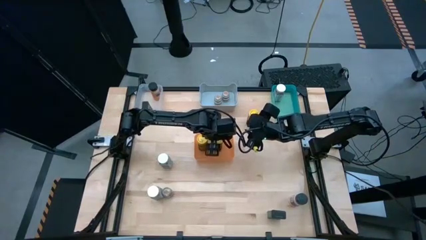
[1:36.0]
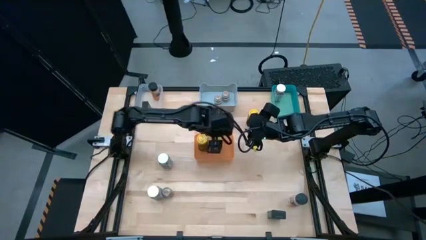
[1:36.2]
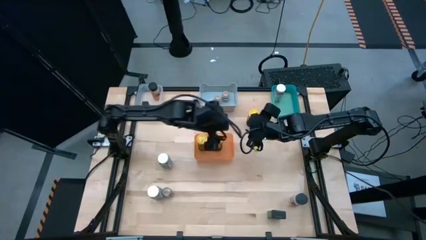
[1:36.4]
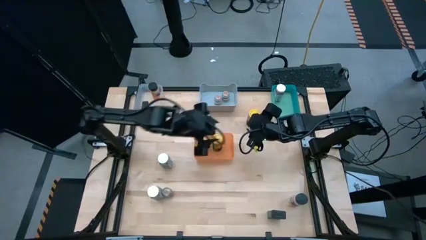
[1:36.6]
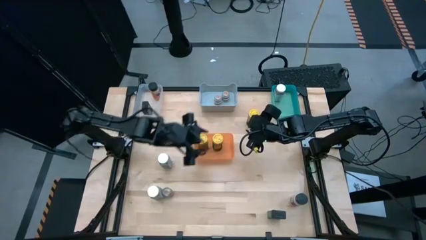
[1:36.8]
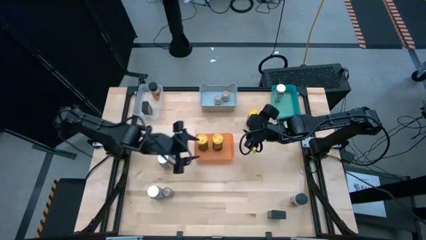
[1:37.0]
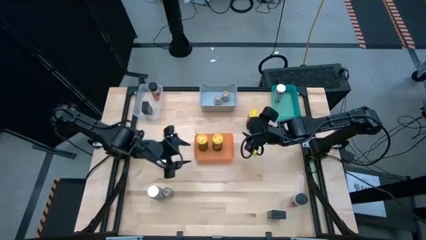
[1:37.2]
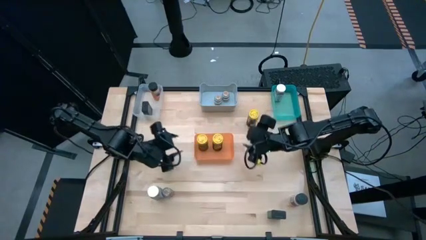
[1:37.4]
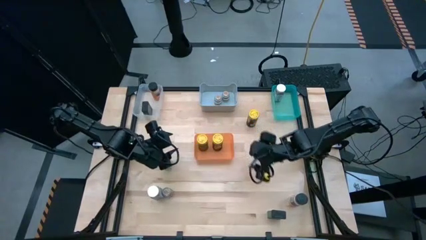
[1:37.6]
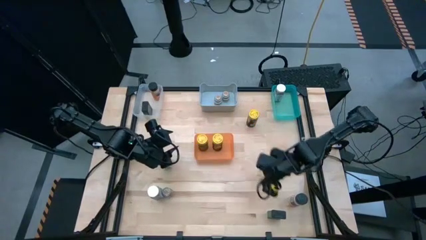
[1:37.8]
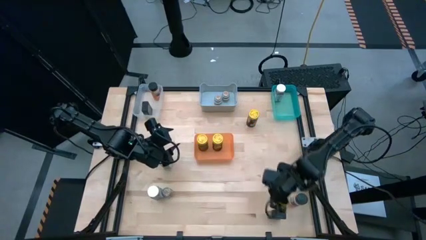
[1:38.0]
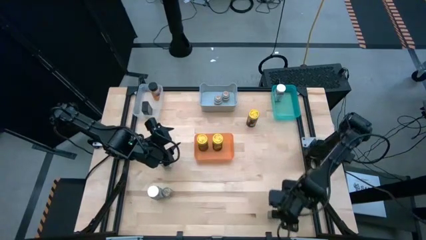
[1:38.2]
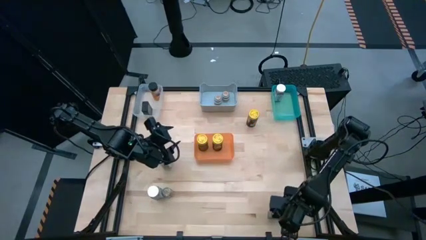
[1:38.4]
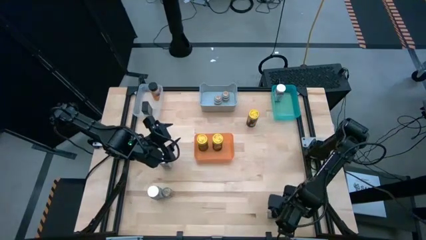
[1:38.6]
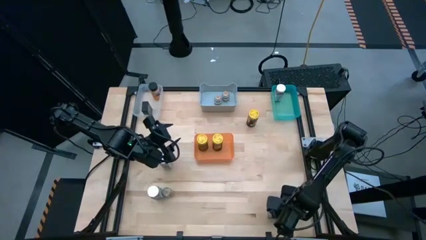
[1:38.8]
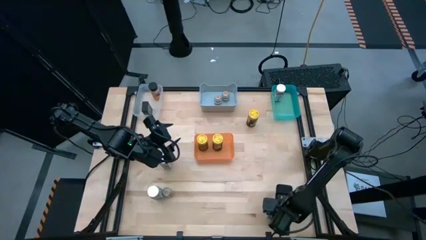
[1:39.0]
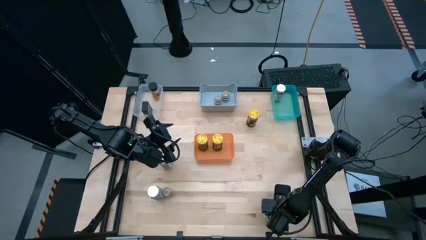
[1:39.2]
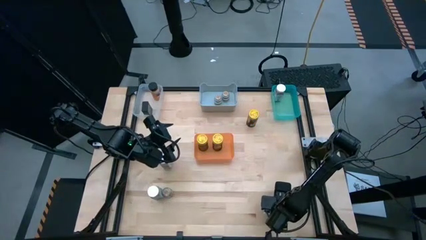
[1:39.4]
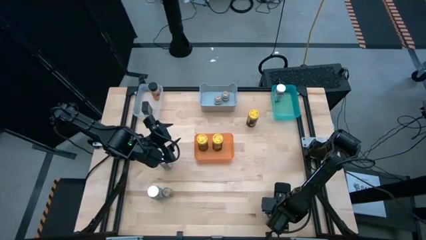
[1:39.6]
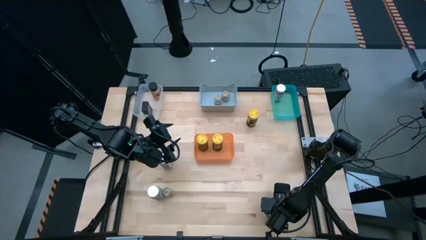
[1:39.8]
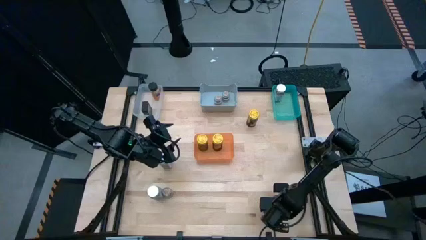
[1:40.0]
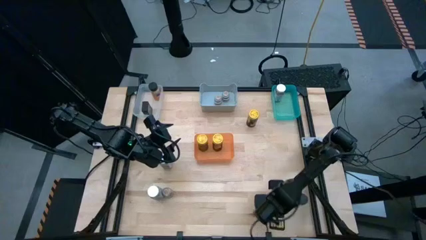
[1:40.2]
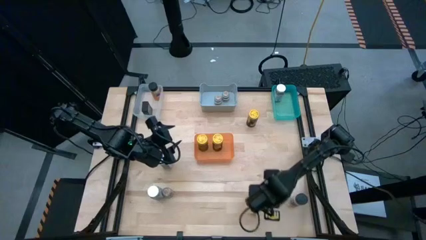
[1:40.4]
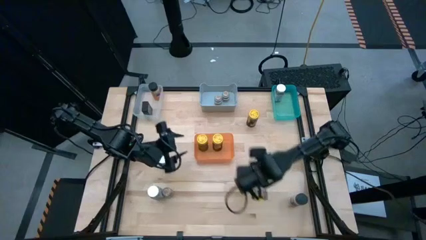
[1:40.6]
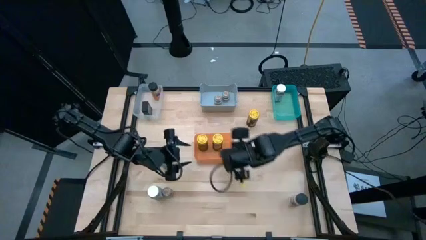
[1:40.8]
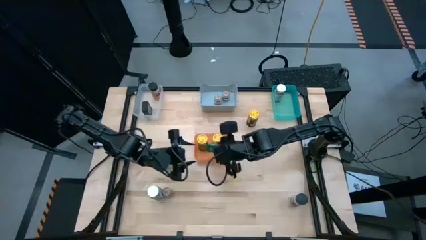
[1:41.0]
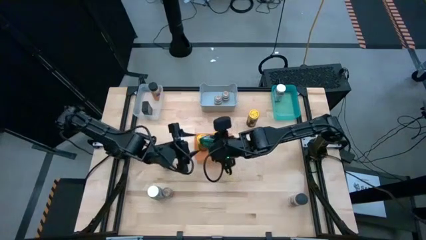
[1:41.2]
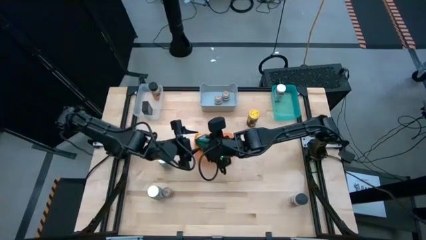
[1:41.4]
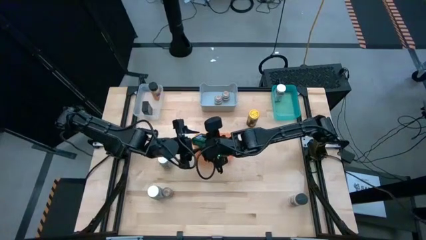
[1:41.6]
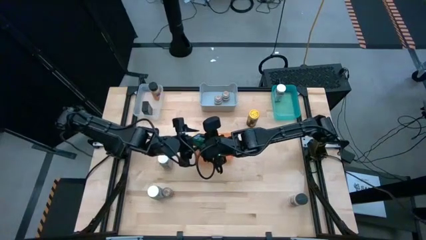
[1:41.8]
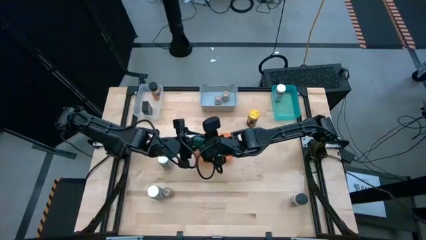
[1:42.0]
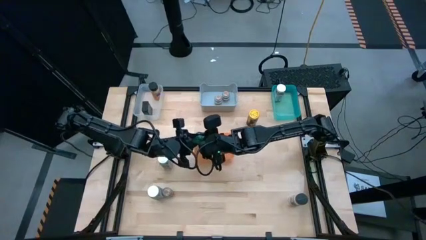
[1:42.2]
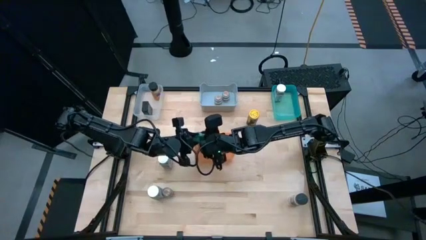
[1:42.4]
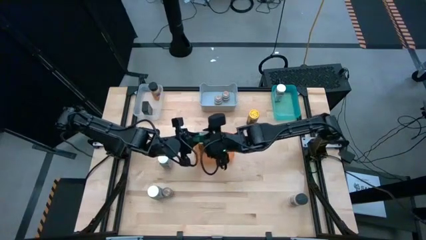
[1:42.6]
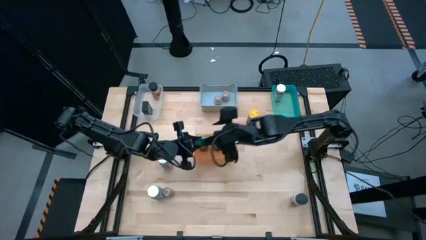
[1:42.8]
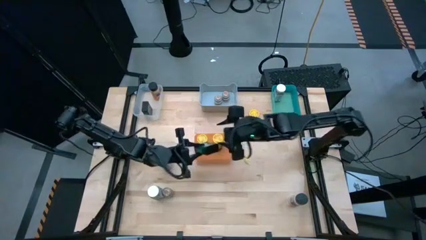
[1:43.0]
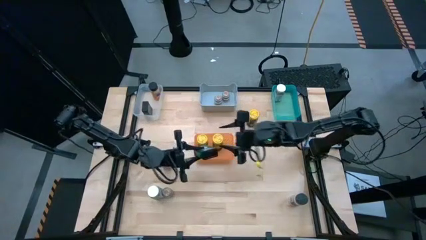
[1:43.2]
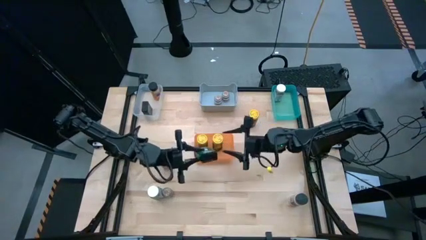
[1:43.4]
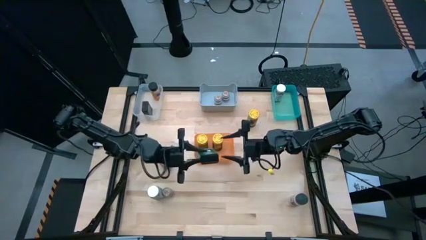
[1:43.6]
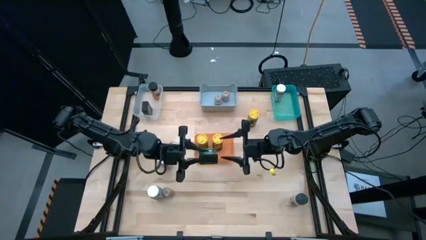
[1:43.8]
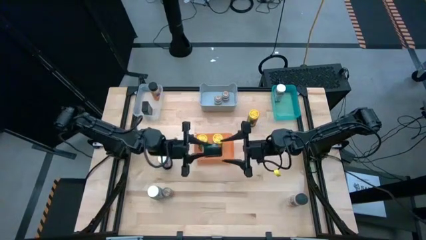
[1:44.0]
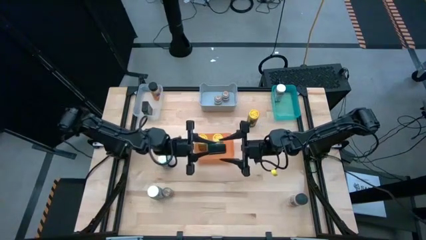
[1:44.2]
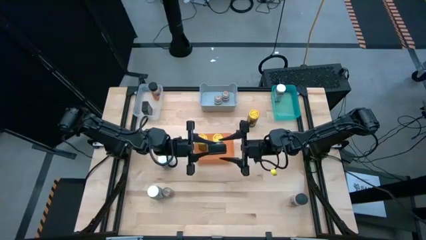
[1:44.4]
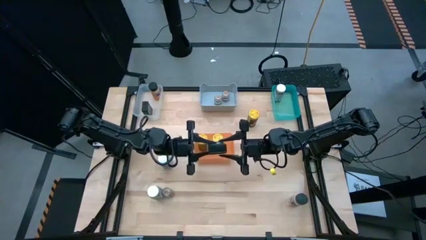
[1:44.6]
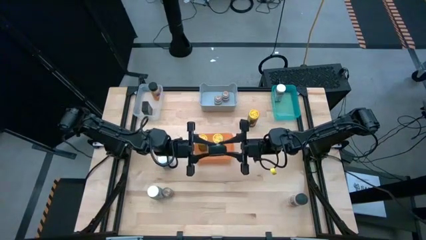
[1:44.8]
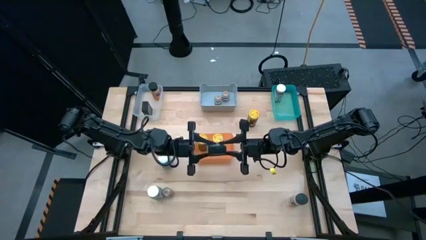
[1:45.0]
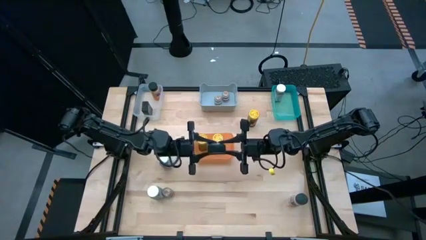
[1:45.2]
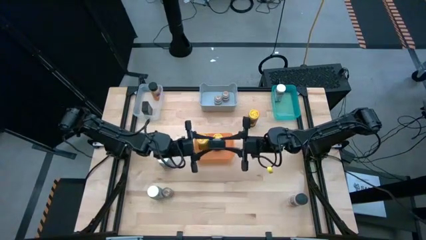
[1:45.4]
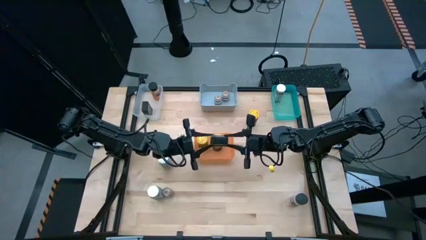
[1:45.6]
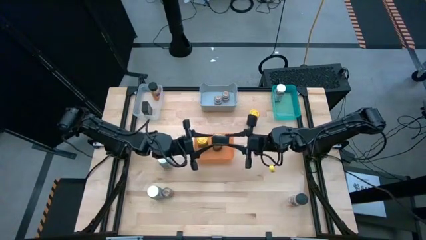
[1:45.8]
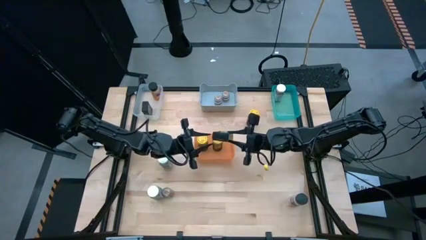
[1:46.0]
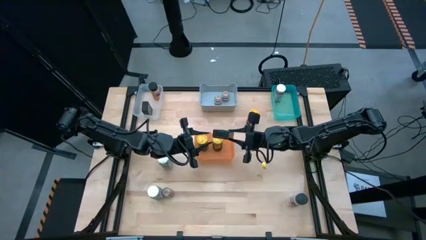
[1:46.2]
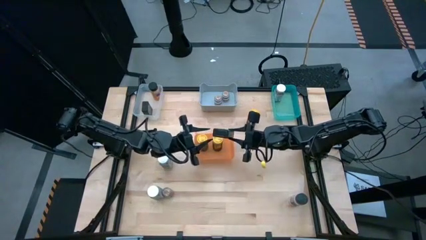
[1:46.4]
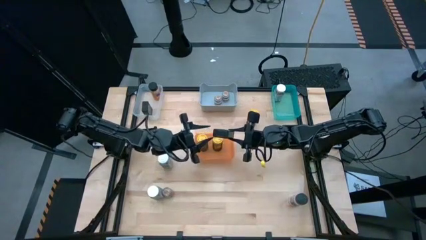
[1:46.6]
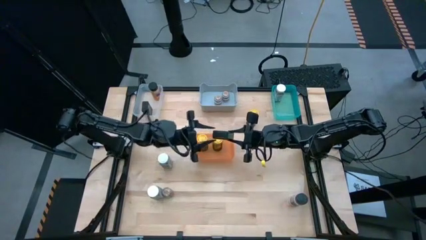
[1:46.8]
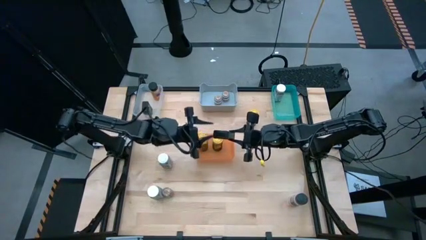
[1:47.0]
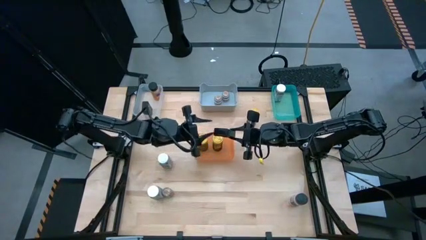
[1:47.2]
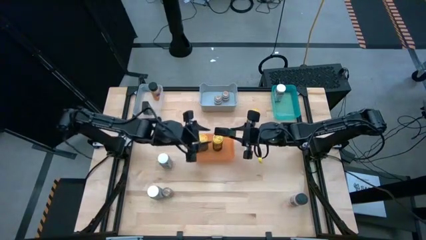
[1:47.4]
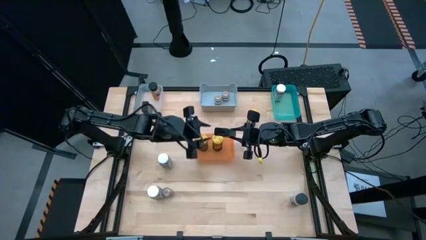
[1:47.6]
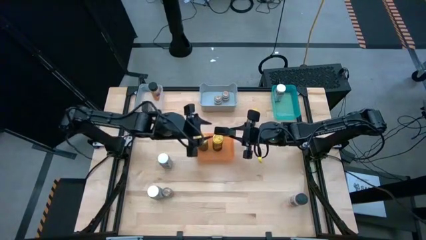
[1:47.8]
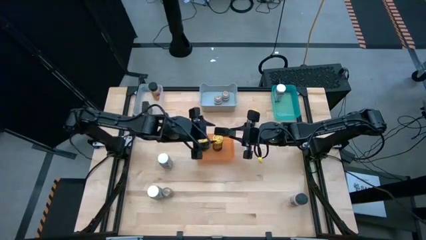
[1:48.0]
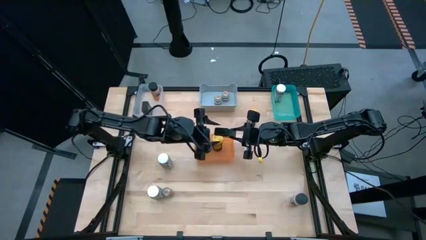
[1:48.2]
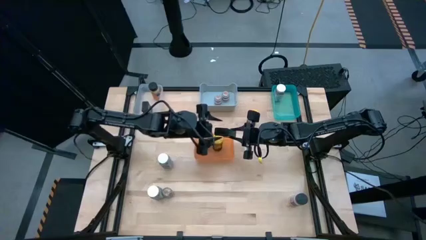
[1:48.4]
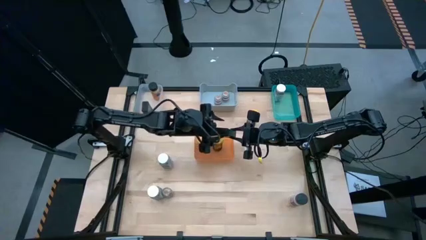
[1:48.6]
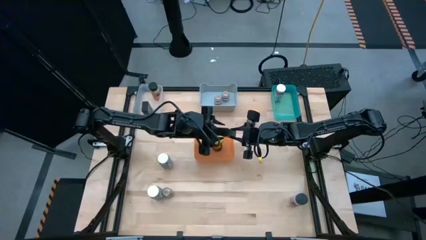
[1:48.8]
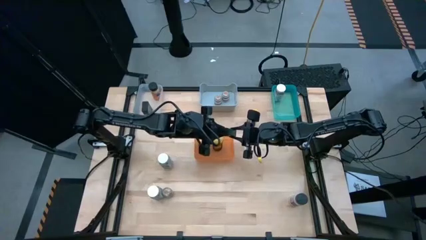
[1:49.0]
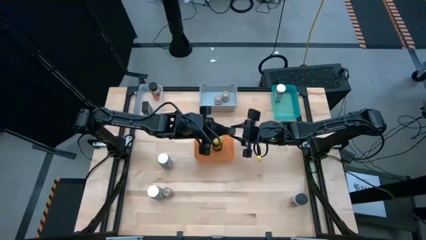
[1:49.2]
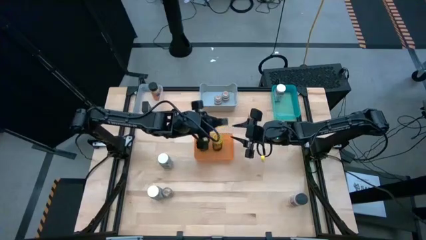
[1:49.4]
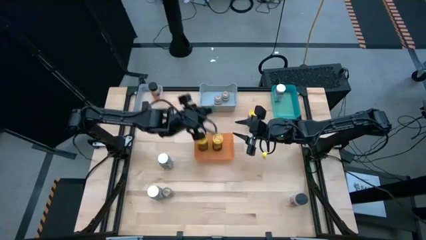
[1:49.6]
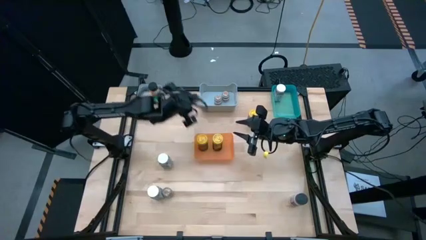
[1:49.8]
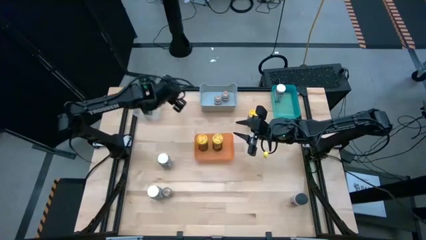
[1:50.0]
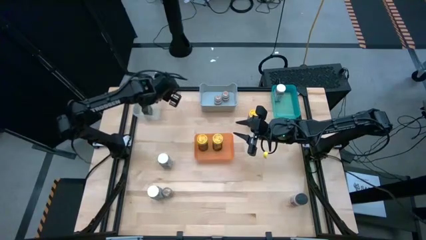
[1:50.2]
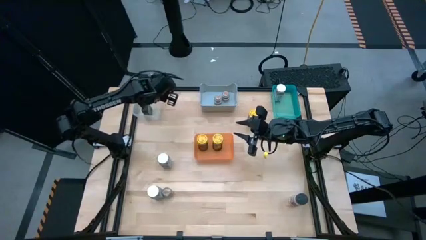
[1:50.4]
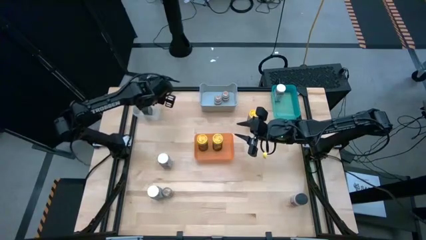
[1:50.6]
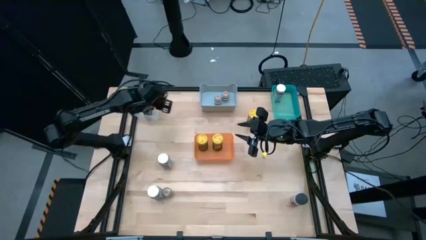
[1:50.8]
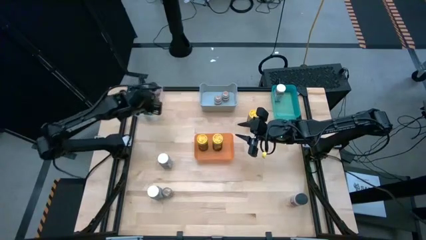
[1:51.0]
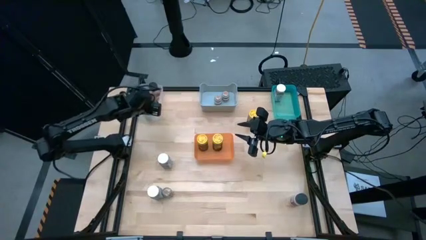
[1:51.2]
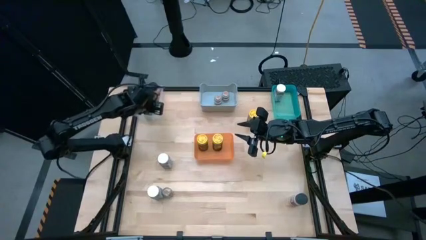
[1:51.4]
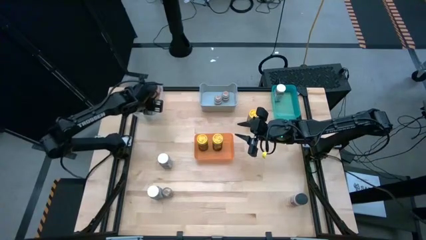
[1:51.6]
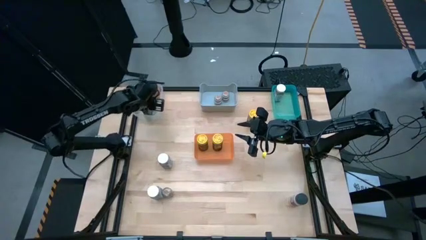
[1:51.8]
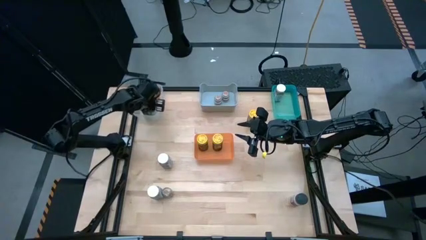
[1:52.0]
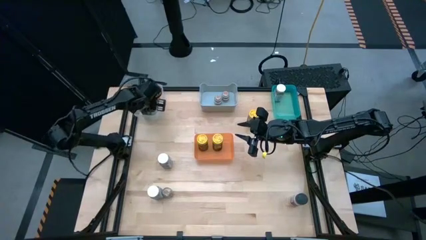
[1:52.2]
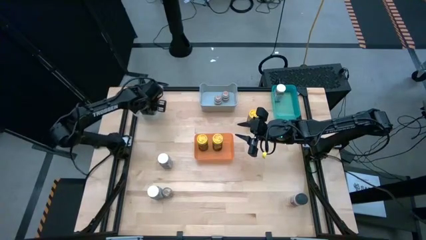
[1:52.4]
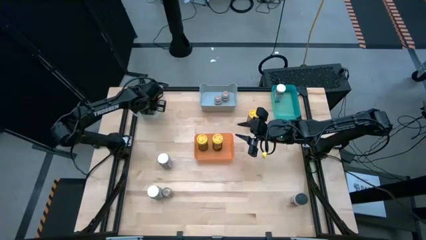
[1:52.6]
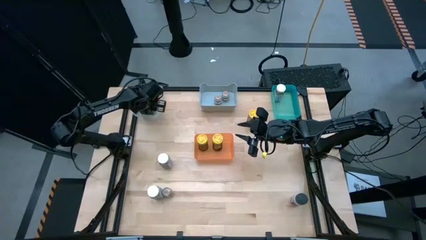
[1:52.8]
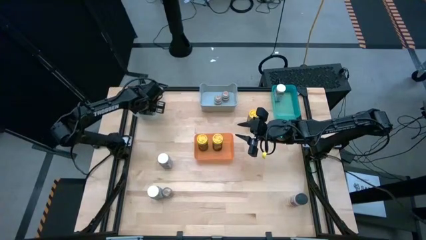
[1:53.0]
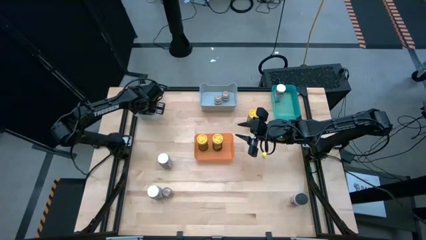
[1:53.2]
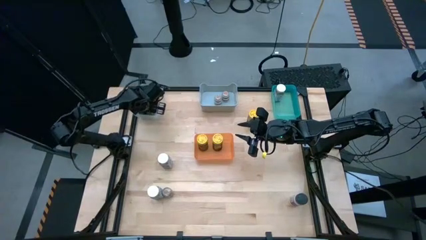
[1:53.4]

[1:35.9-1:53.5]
Task: Sort spices by type
Put the black seasoning can into the transparent bin
